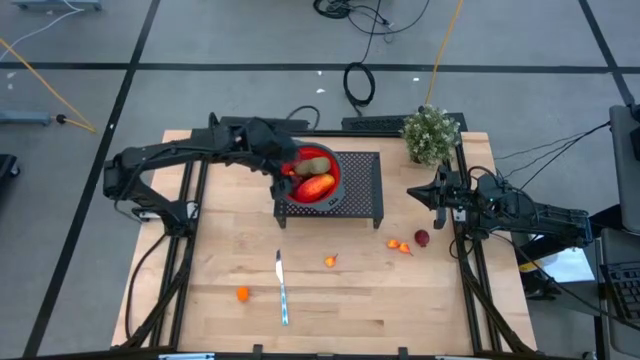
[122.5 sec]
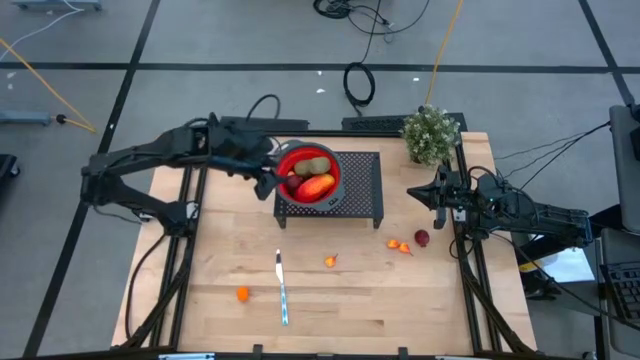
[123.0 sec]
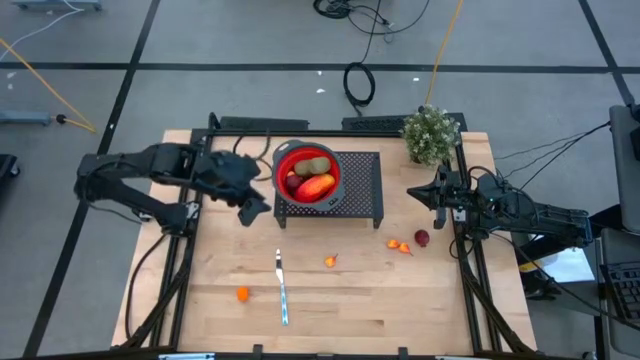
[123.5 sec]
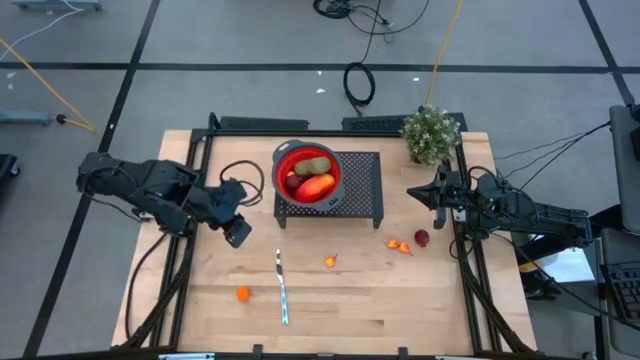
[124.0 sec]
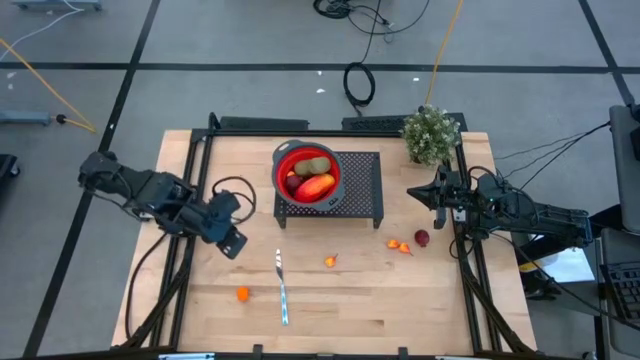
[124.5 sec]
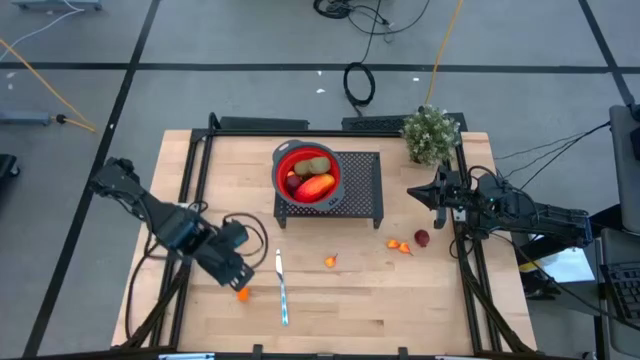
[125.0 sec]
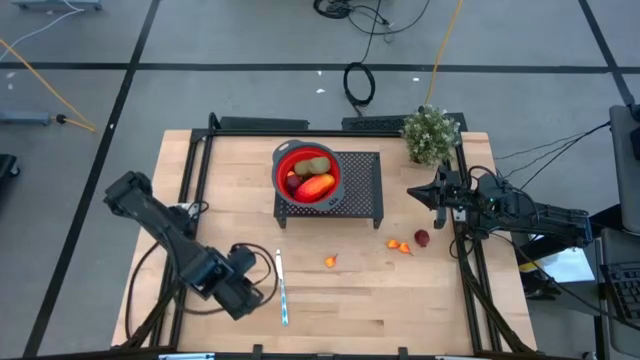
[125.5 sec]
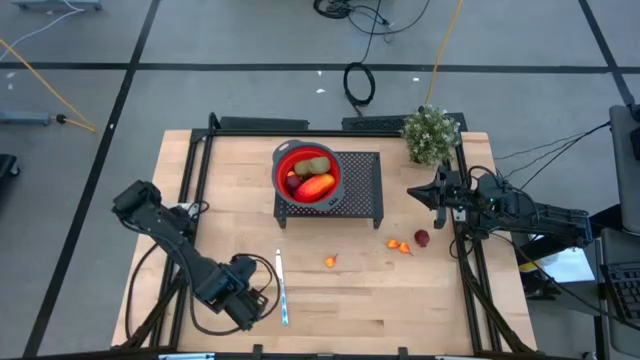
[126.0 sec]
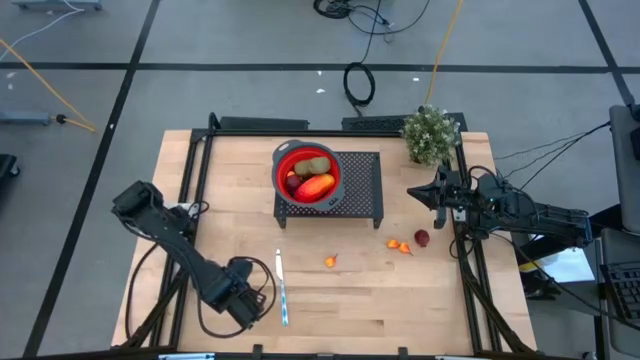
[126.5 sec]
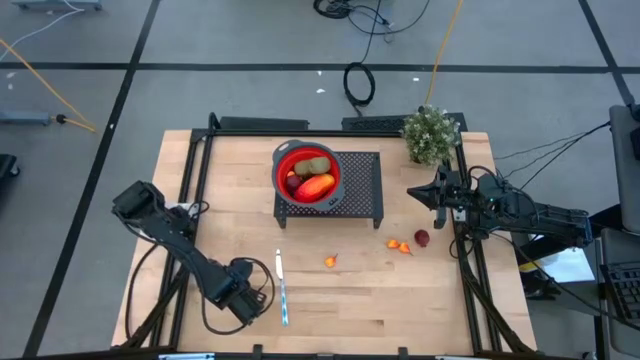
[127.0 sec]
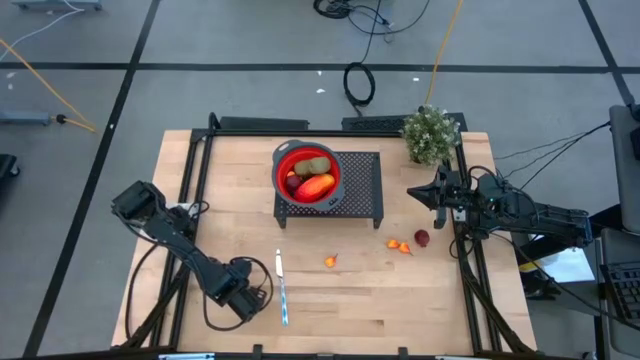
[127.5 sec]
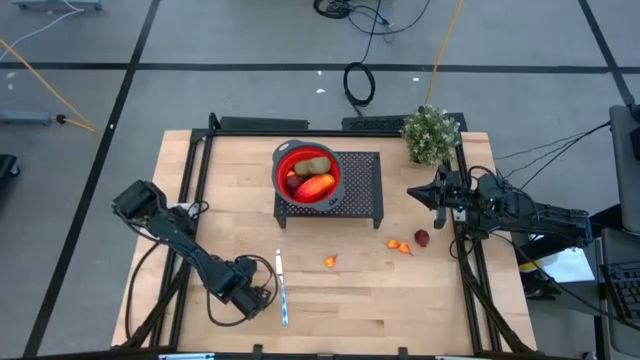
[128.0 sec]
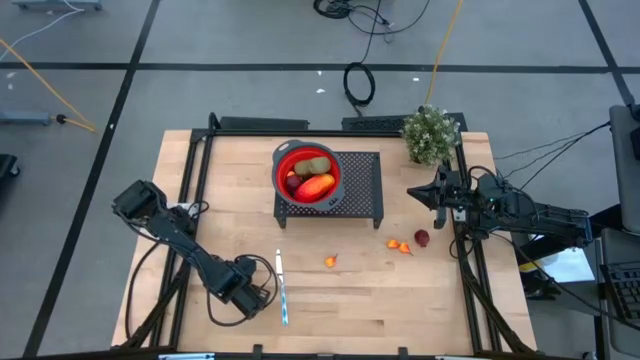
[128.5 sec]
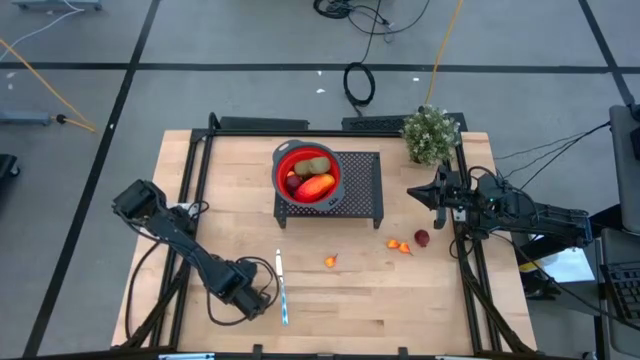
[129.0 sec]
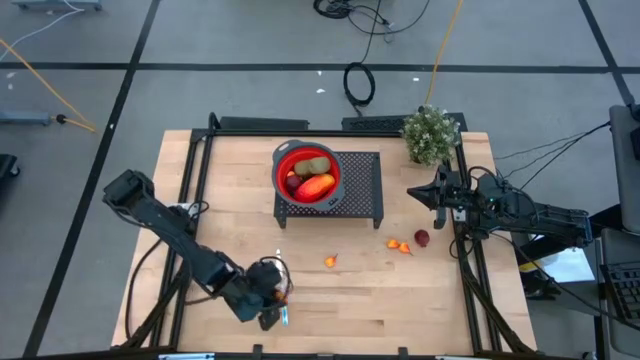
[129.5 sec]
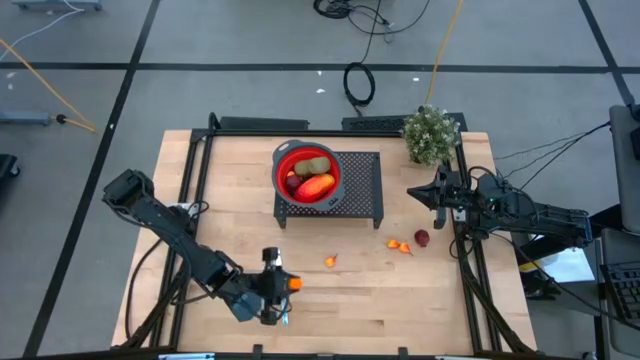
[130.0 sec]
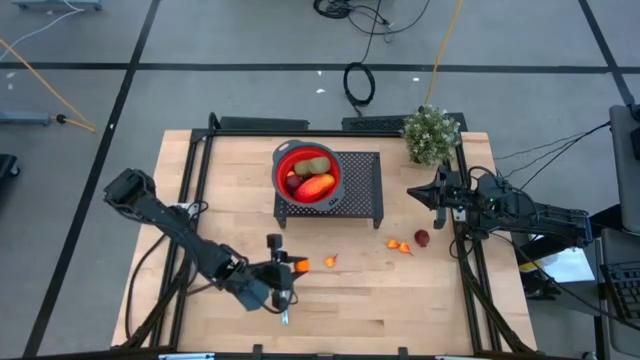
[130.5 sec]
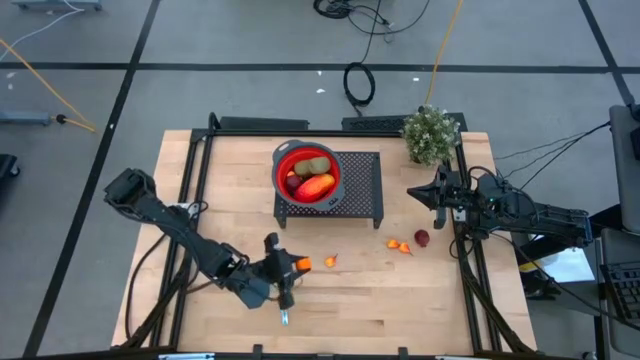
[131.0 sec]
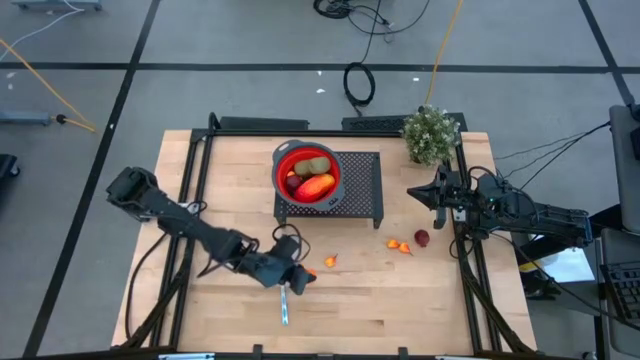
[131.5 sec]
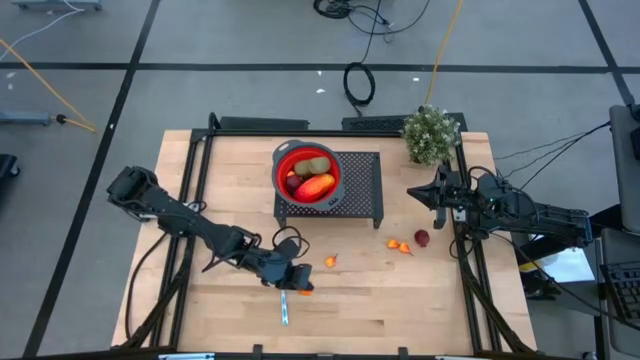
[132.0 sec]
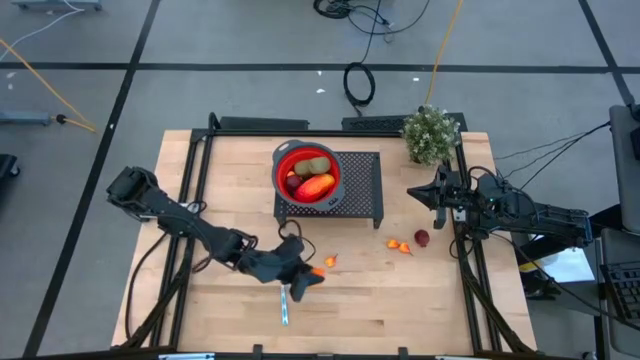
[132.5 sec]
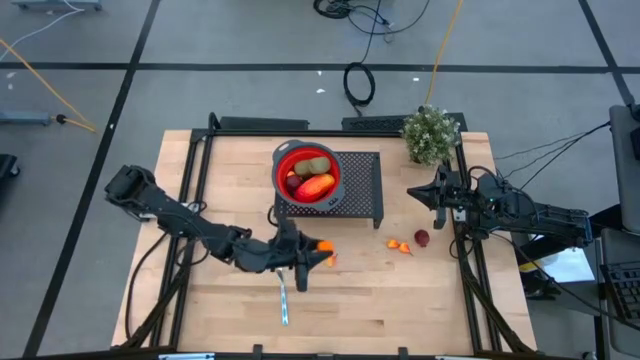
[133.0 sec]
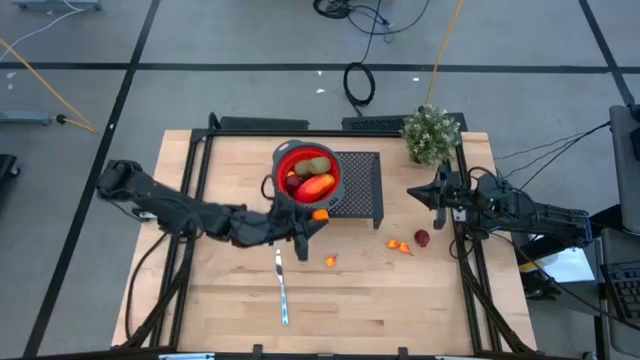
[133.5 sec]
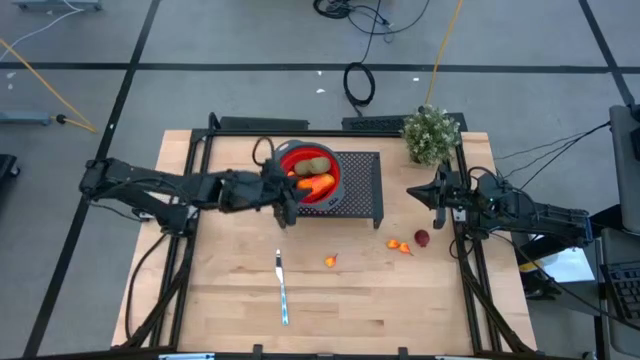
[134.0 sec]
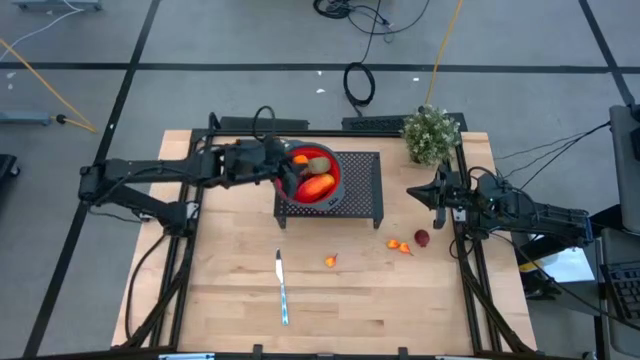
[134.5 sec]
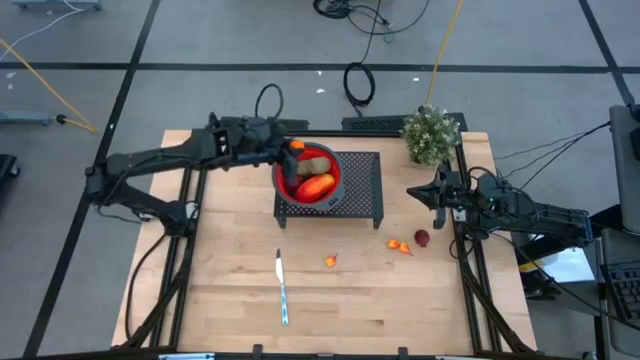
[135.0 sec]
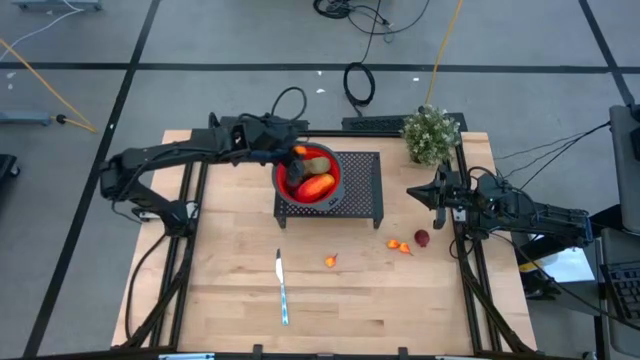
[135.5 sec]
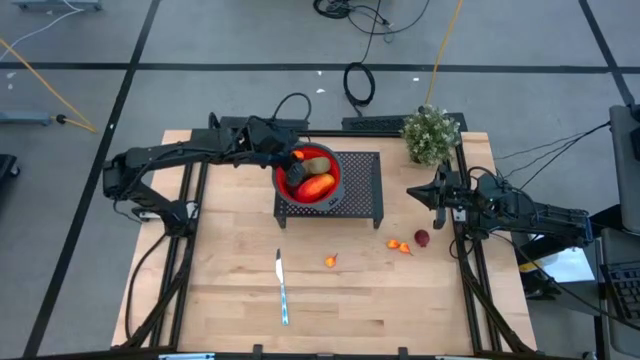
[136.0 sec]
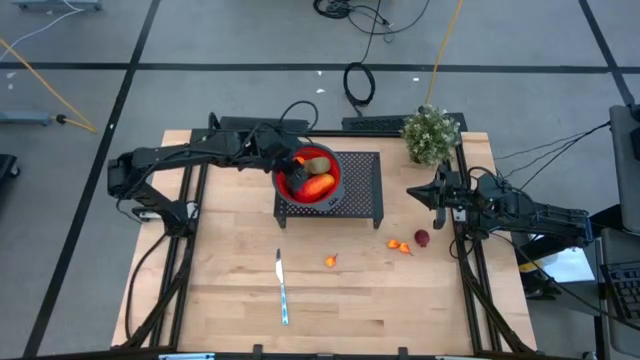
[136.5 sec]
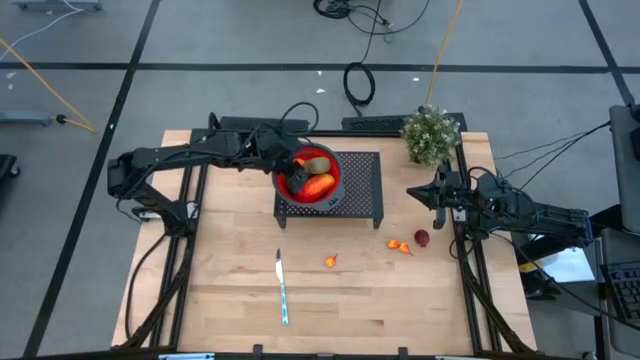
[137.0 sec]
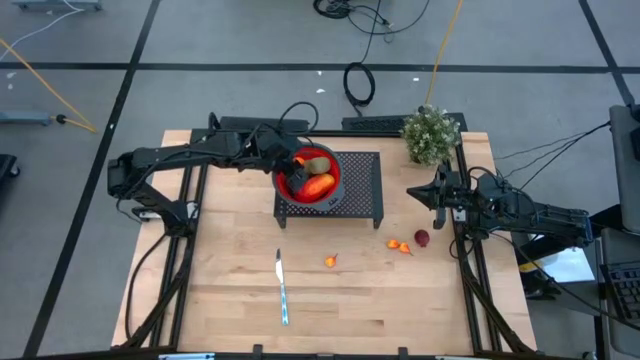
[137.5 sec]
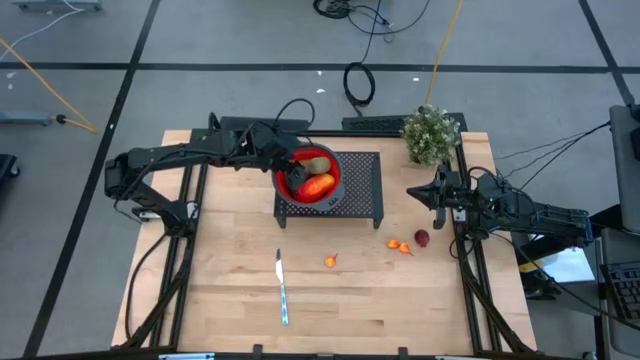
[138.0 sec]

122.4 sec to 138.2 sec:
Task: Pick & Place Fruit
Put the orange into the strainer on the shelf

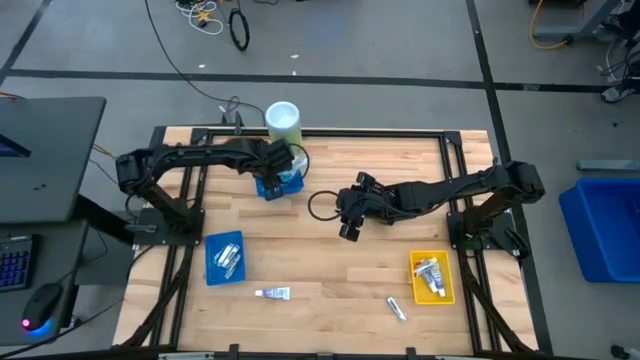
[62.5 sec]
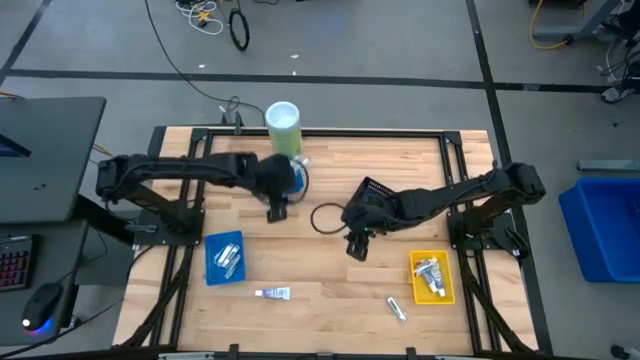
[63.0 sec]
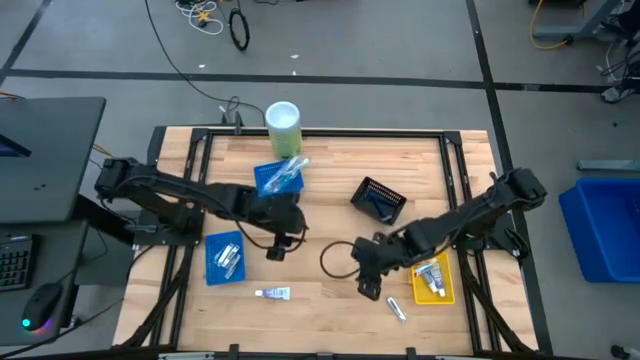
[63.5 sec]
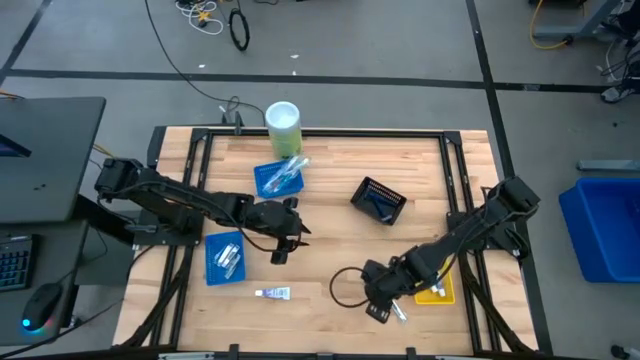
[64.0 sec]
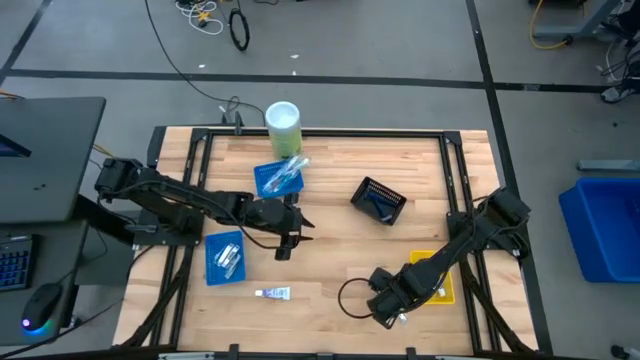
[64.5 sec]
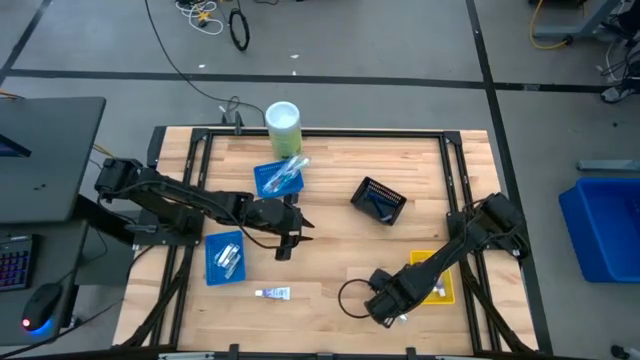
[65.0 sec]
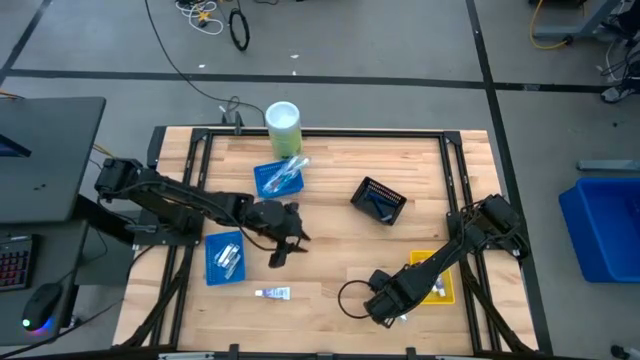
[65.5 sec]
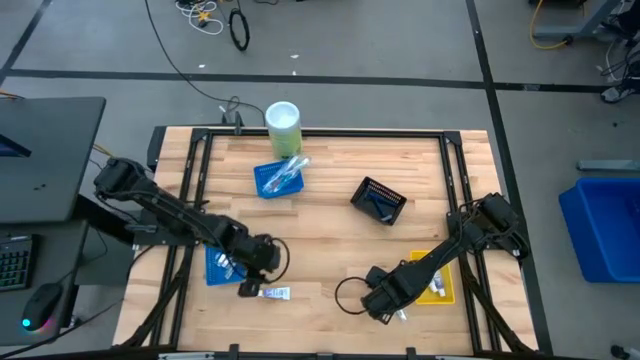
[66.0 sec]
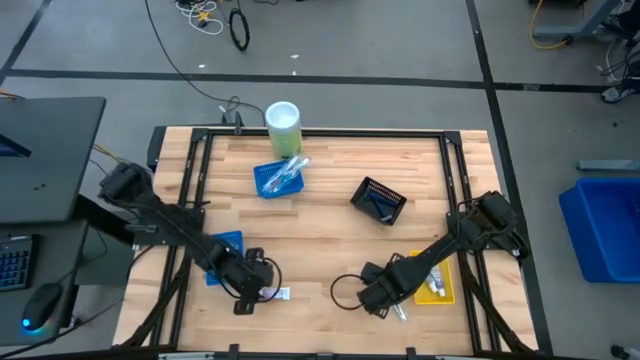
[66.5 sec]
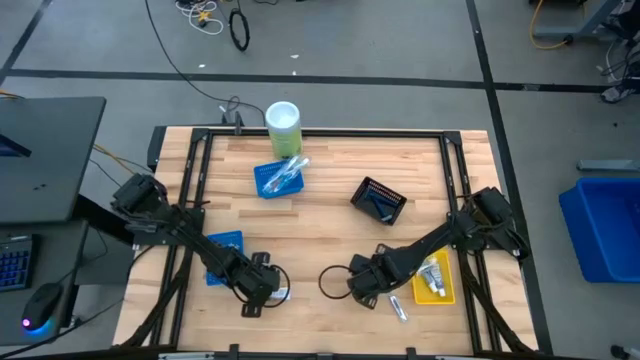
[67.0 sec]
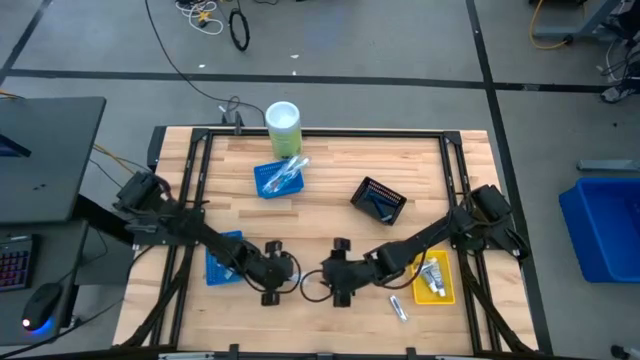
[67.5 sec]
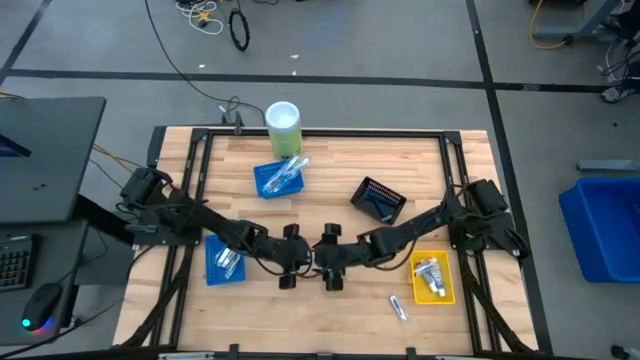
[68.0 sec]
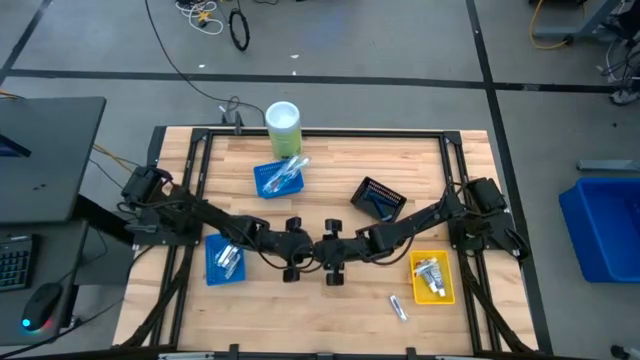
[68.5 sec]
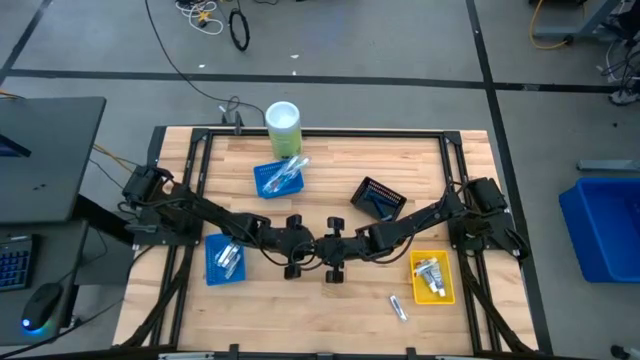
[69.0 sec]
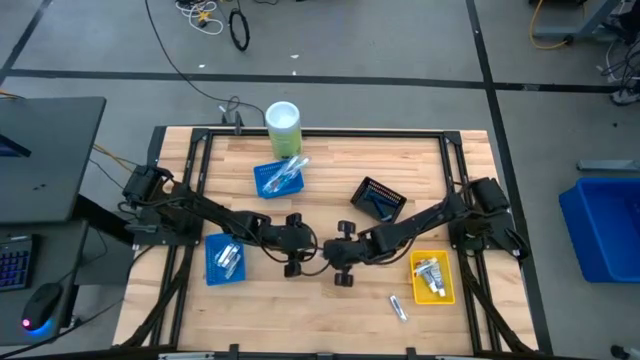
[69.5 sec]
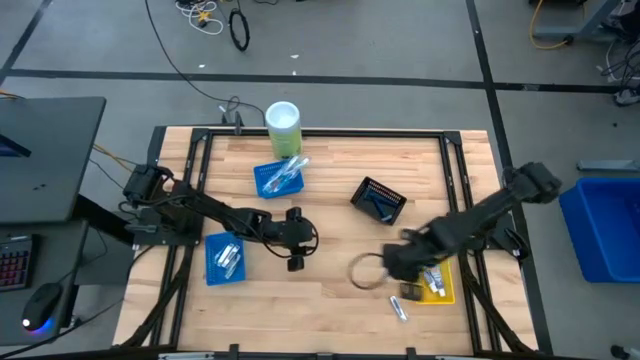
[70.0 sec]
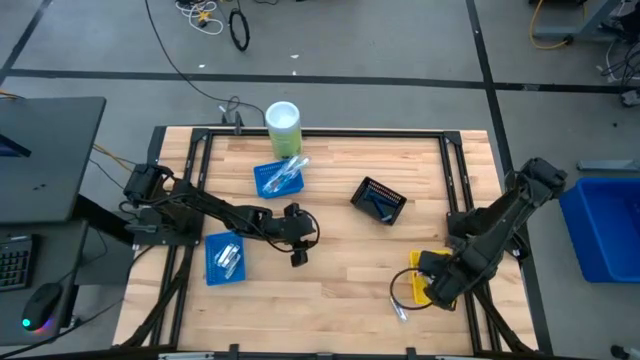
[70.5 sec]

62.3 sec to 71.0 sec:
Task: Pick & Place Travel size toiletries
Put the white toothpaste into the yellow bin
